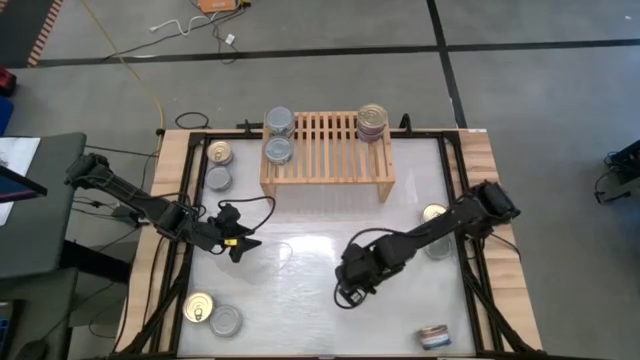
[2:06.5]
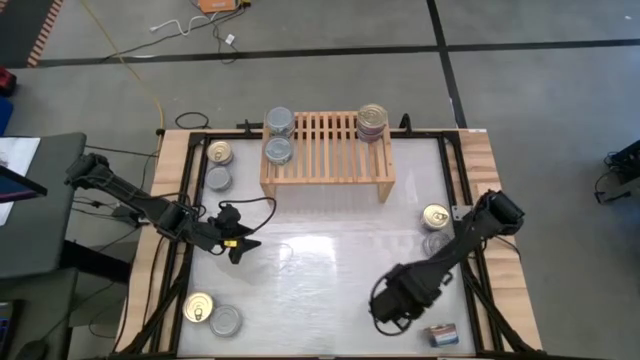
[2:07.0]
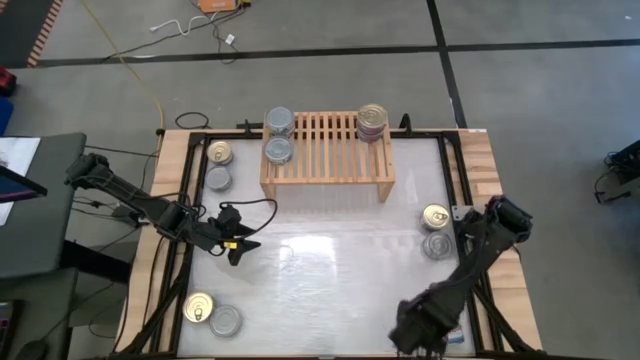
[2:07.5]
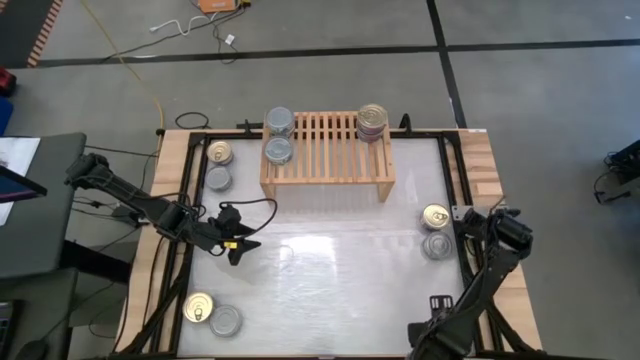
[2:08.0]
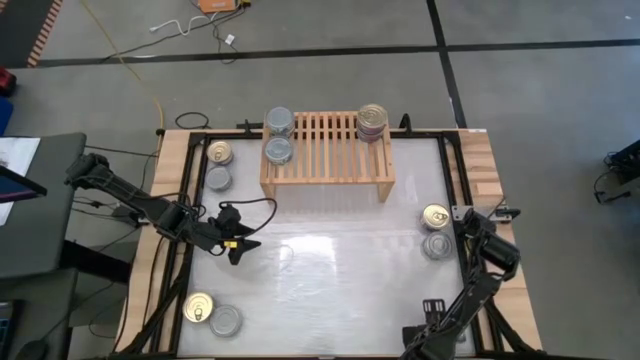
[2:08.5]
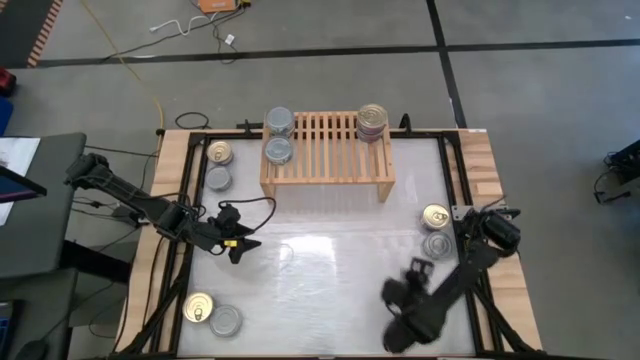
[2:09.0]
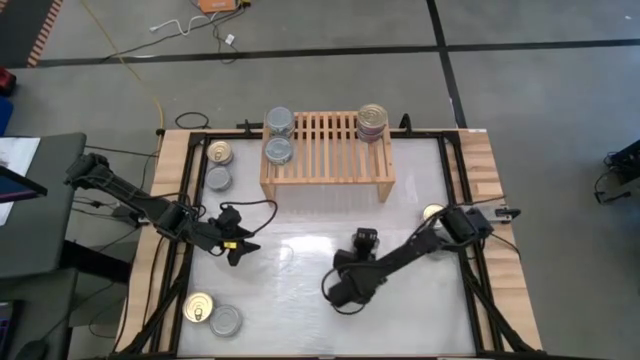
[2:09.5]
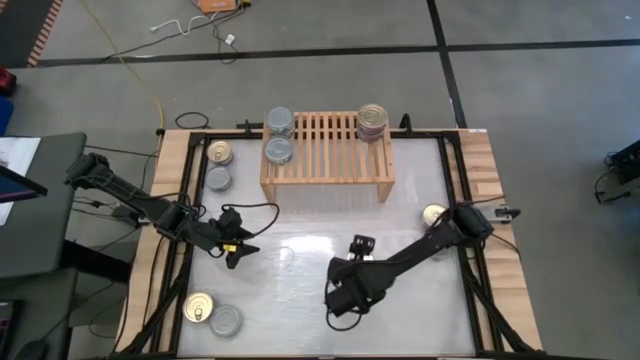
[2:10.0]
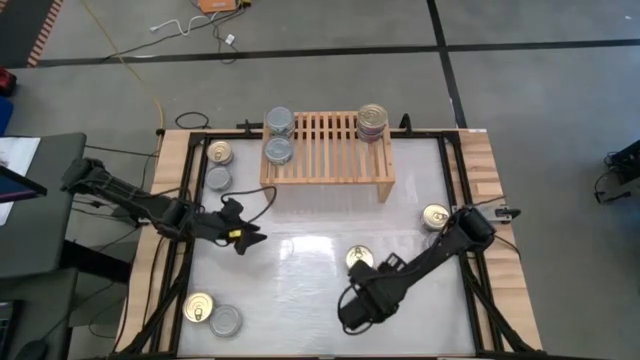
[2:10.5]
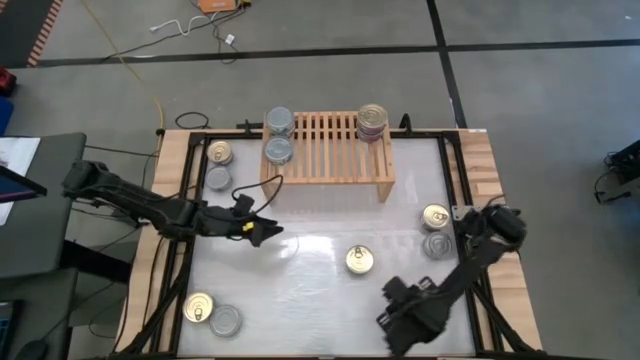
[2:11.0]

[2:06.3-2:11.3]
Task: Stack canned seafood by type on shelf
Move the blue tuna can to the center of the table

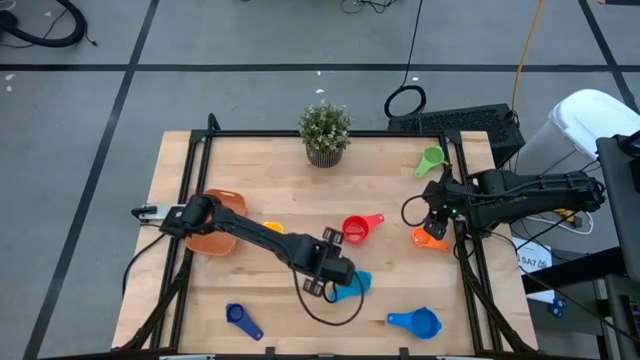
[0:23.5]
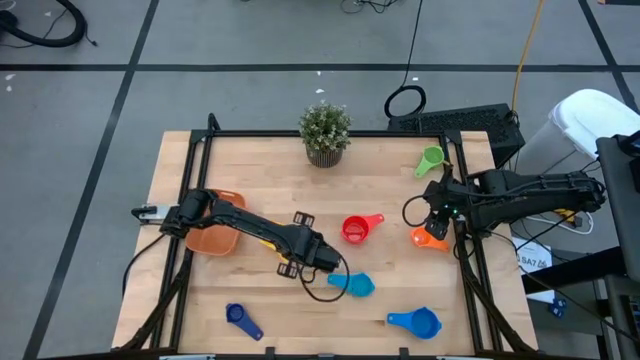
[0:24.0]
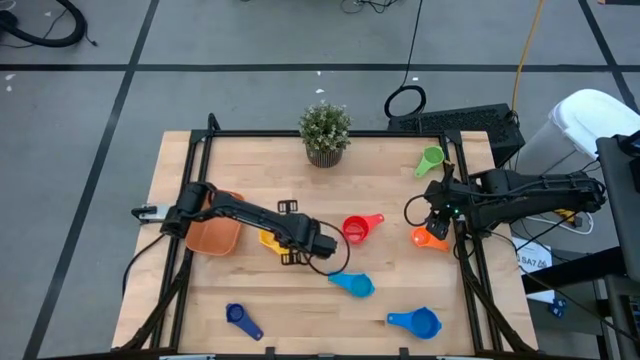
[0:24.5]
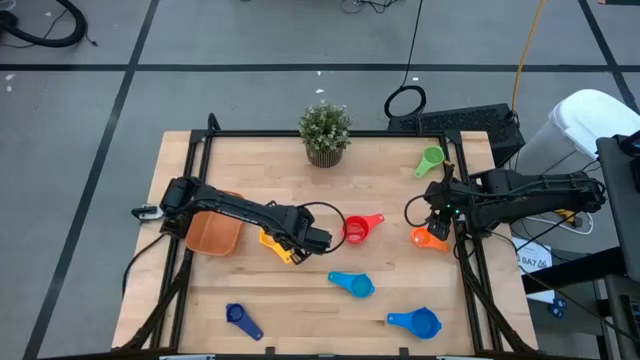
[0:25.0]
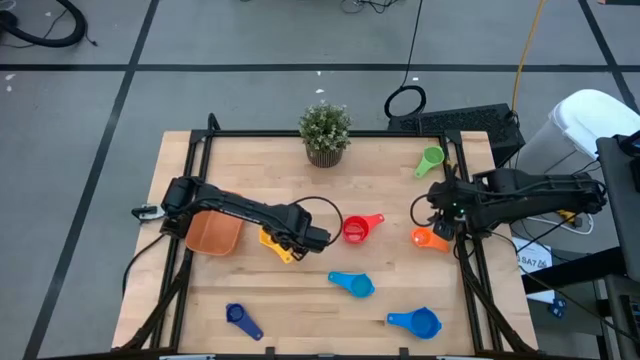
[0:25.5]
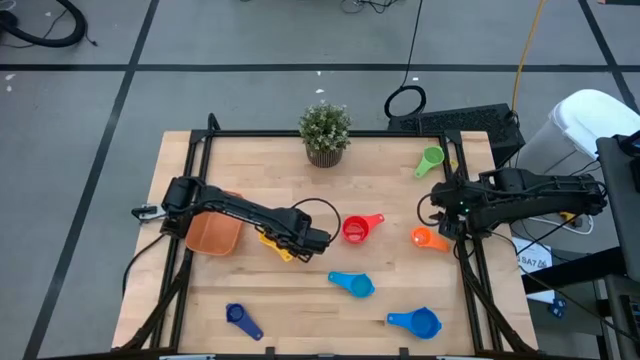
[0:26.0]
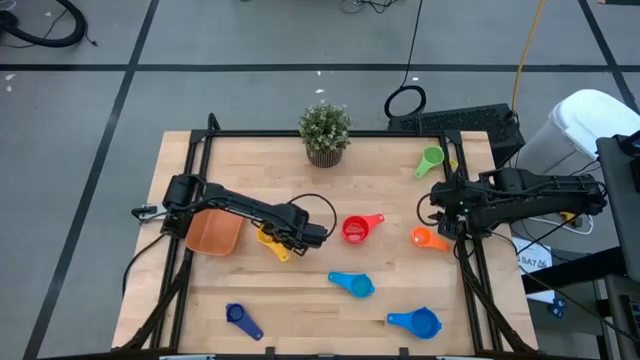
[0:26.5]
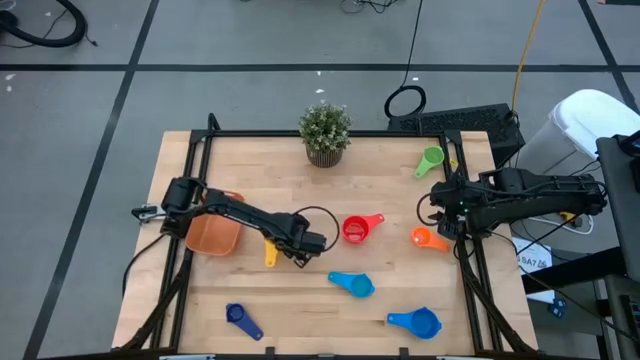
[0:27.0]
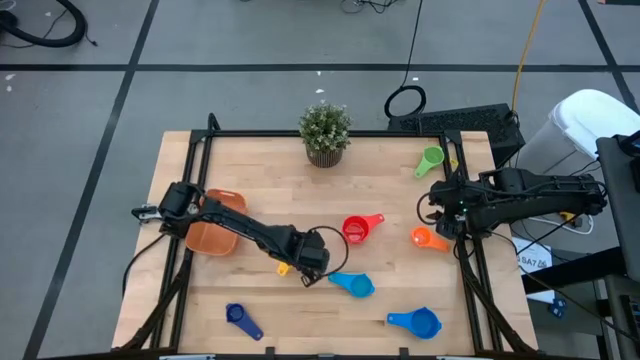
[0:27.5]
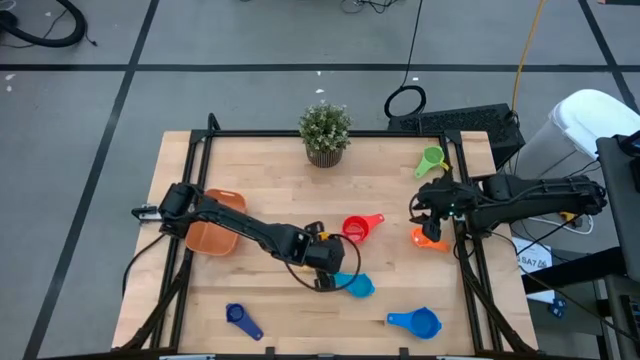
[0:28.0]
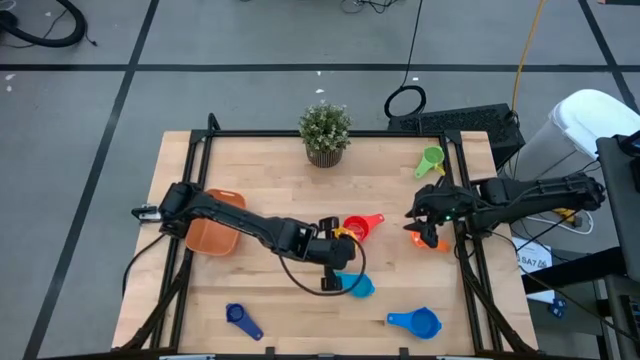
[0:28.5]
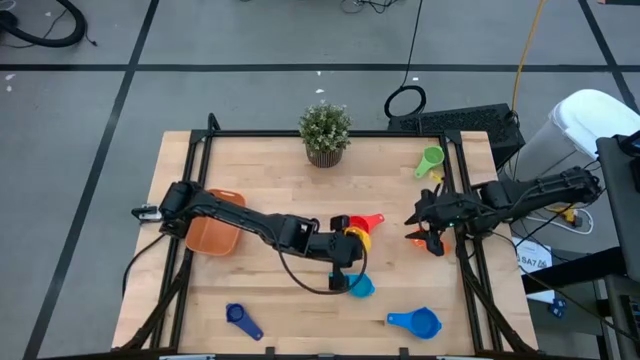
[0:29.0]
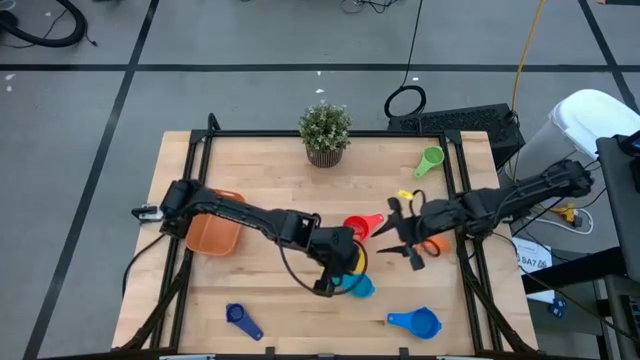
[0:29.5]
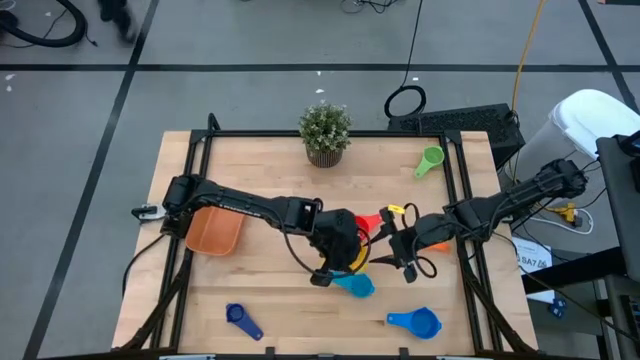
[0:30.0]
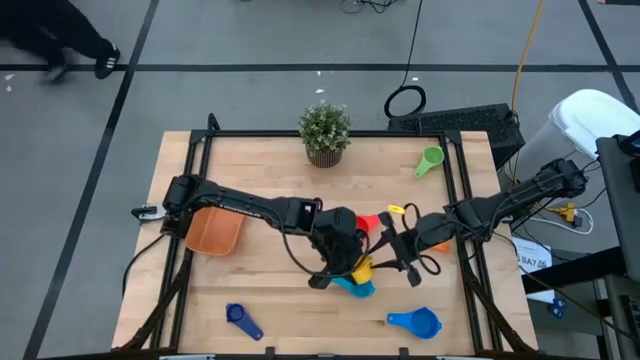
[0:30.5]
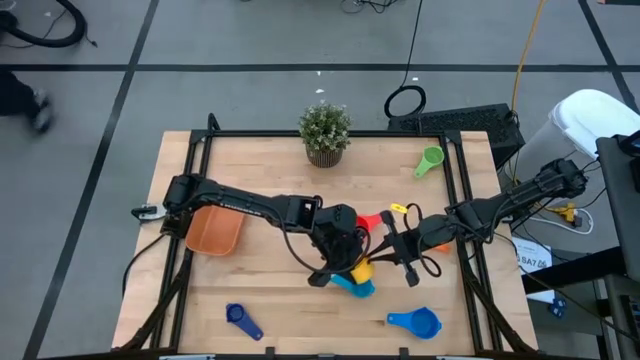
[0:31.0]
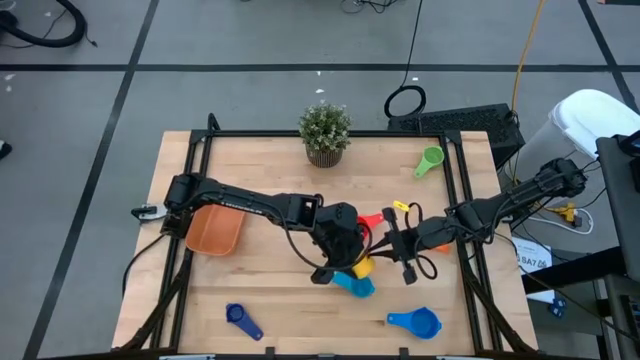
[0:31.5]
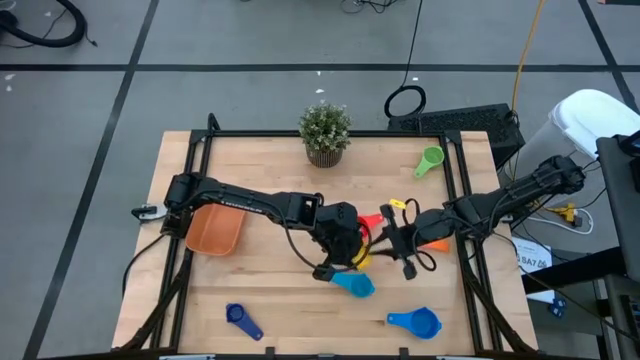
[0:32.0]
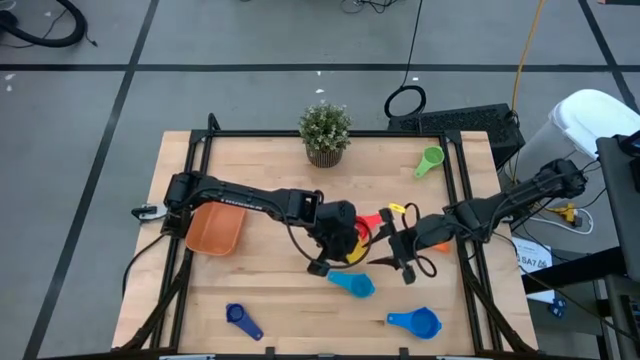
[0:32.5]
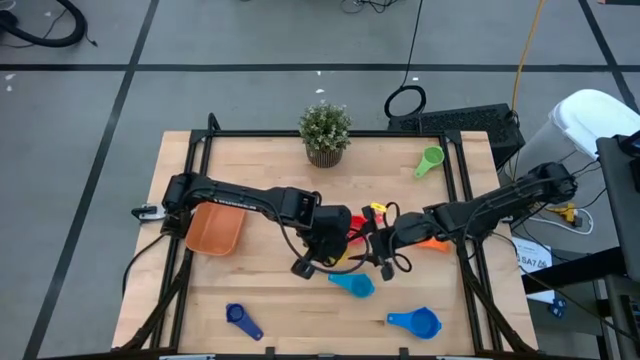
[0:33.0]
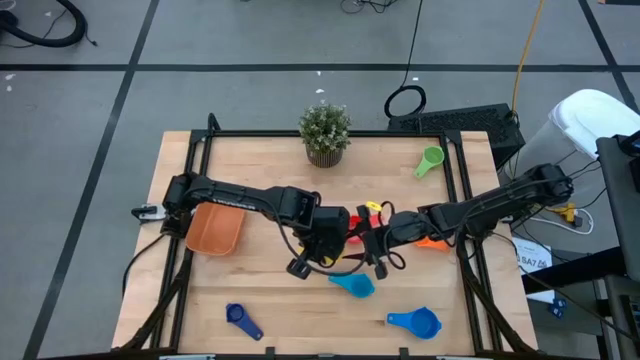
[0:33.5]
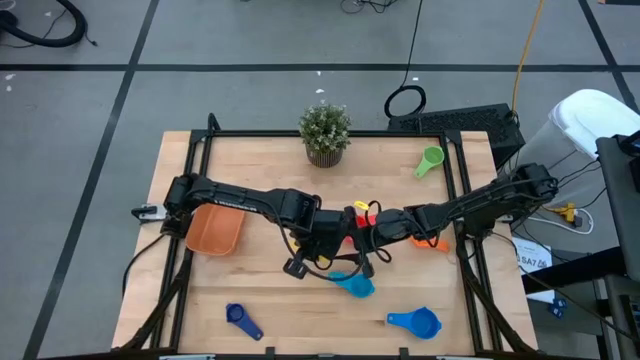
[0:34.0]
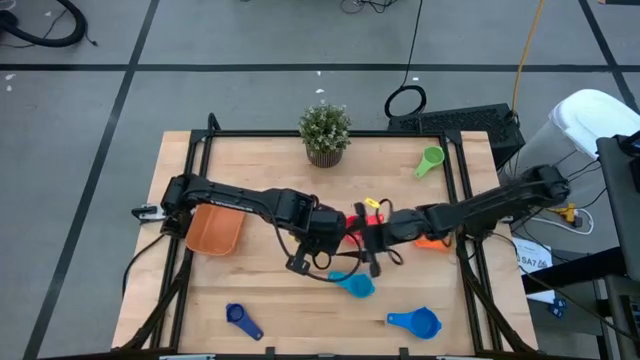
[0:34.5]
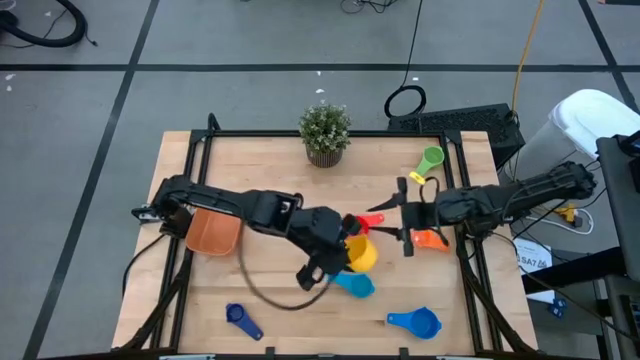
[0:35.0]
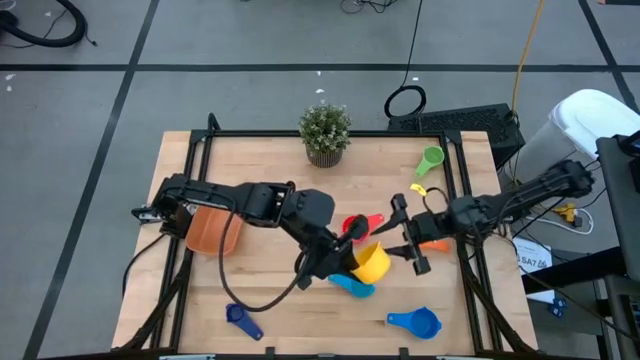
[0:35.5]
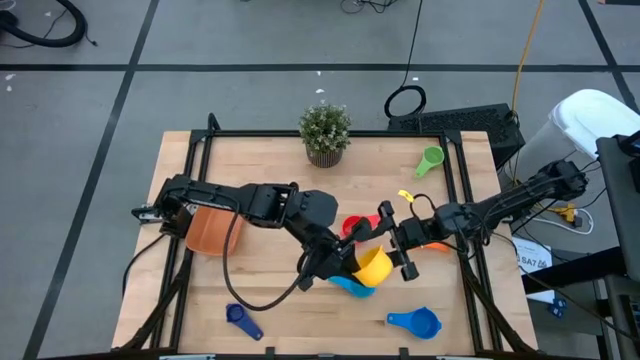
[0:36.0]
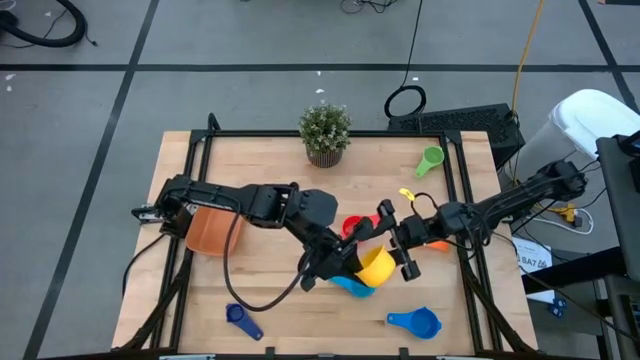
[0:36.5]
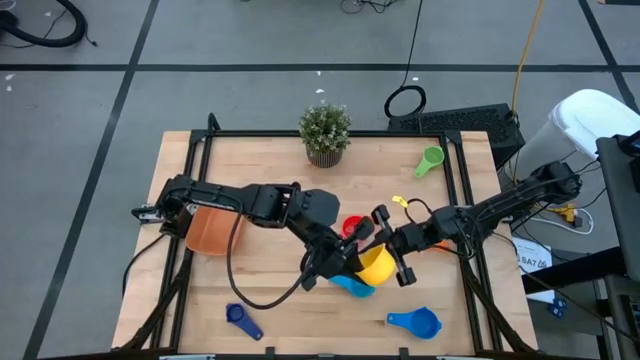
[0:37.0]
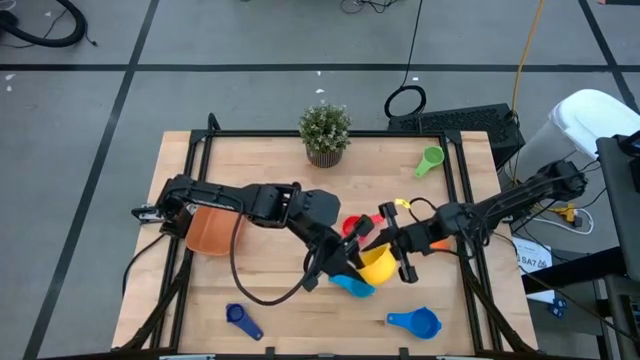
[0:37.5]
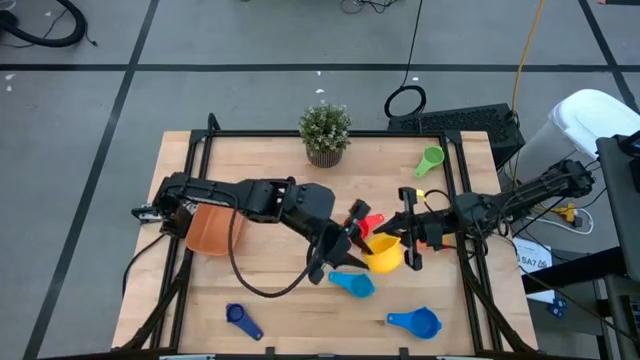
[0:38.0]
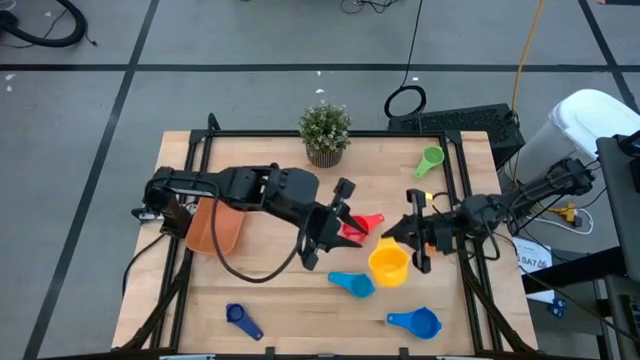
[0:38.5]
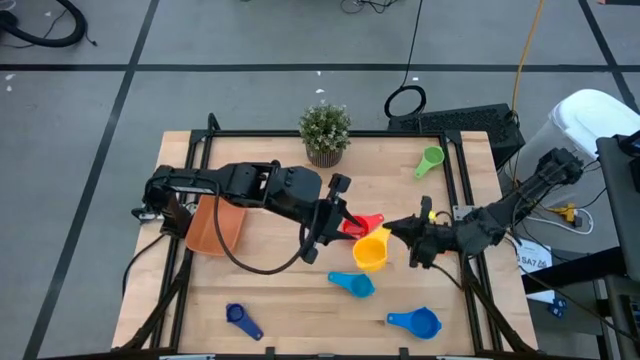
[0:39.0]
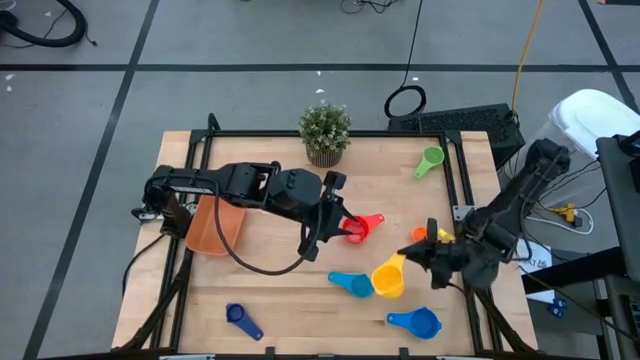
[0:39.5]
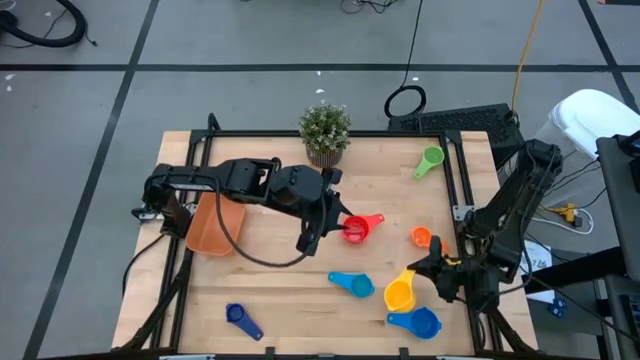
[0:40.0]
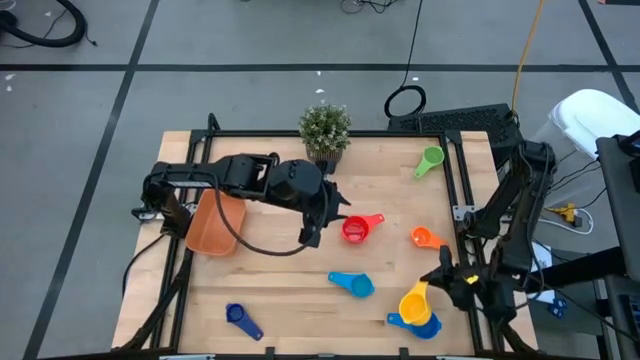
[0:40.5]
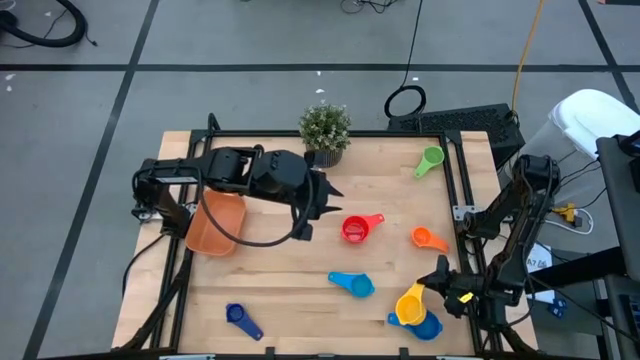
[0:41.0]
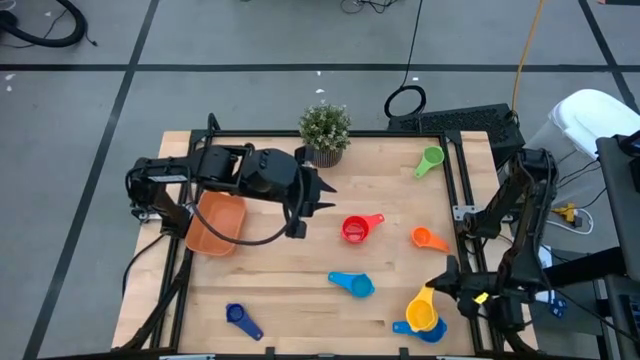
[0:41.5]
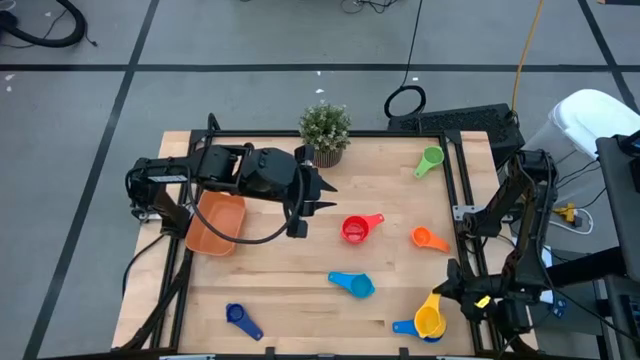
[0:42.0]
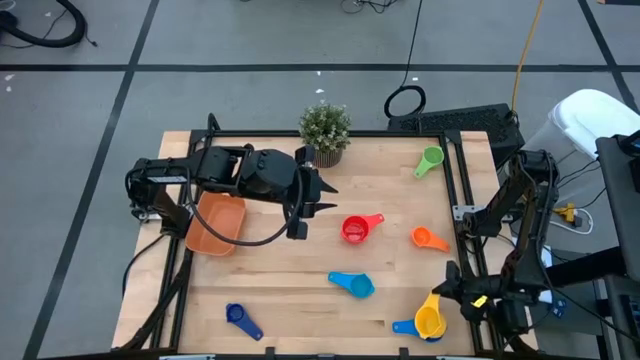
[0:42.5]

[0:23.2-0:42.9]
Task: Nest measuring cups in basket
Stack the yellow measuring cup on top of the blue measuring cup
